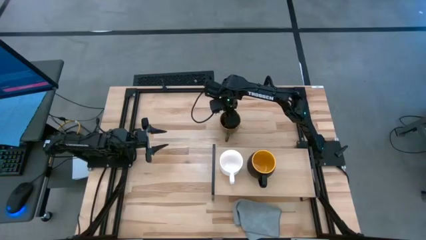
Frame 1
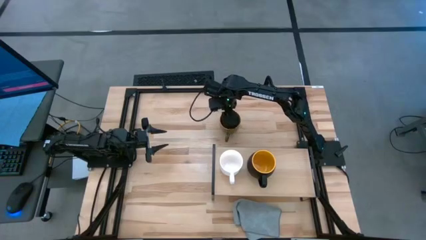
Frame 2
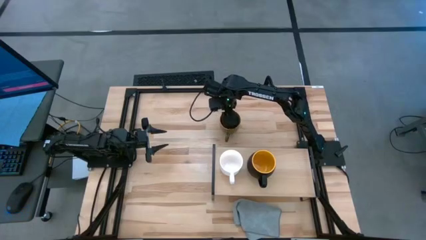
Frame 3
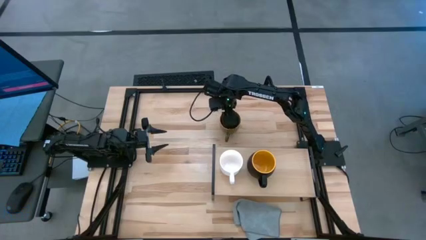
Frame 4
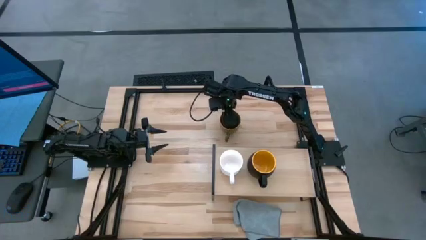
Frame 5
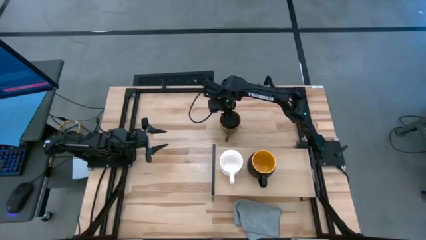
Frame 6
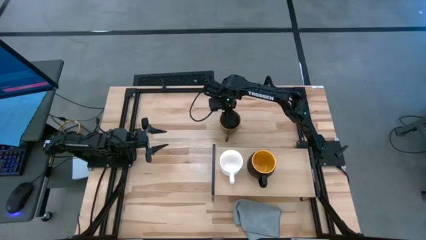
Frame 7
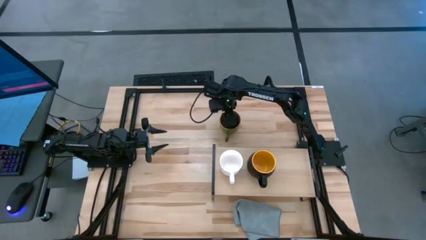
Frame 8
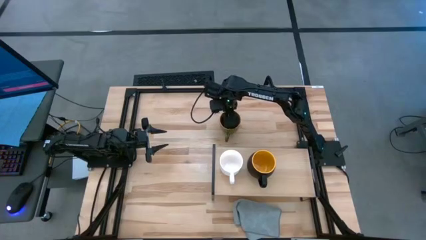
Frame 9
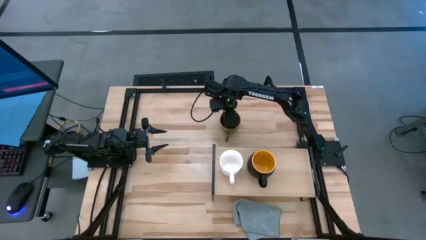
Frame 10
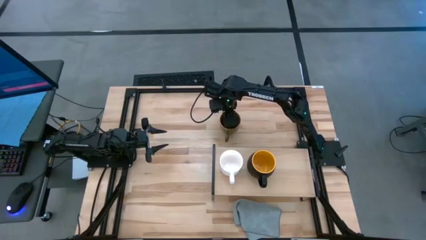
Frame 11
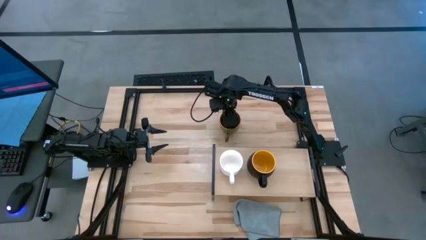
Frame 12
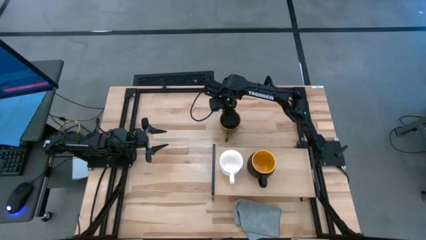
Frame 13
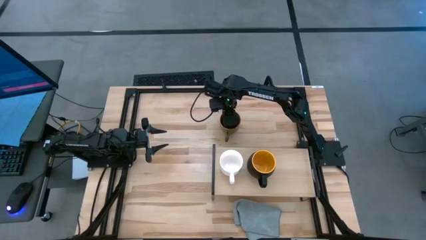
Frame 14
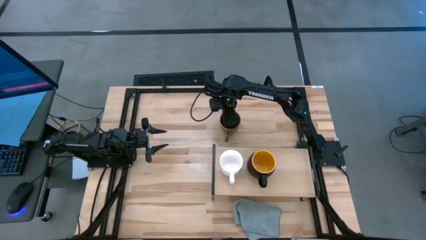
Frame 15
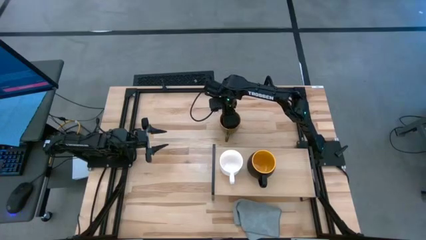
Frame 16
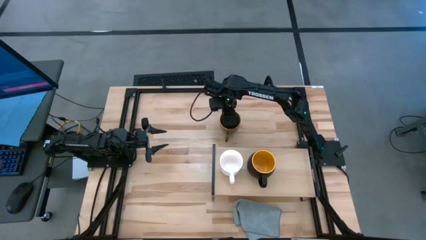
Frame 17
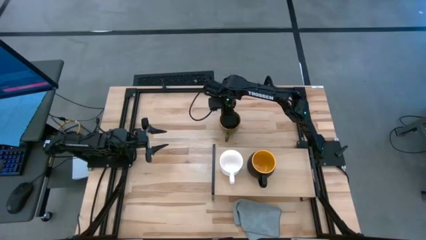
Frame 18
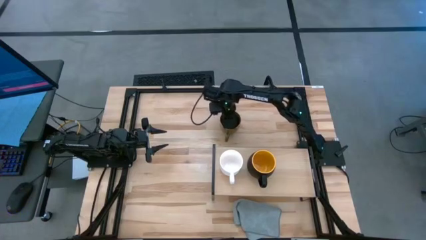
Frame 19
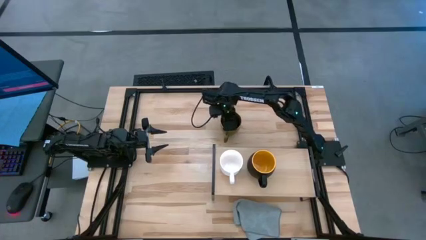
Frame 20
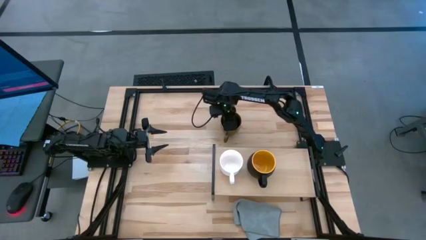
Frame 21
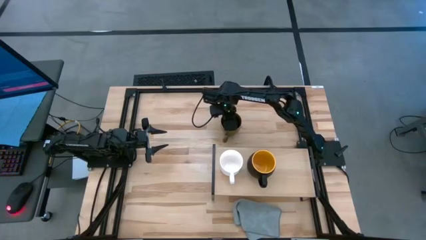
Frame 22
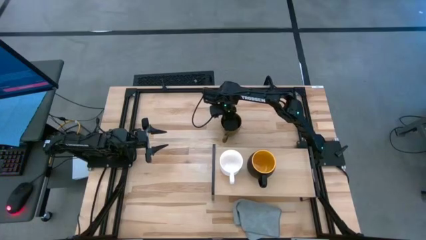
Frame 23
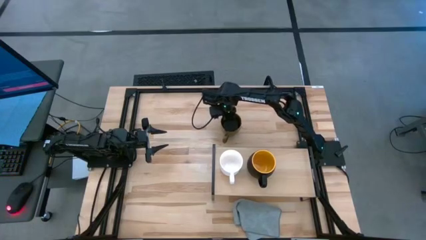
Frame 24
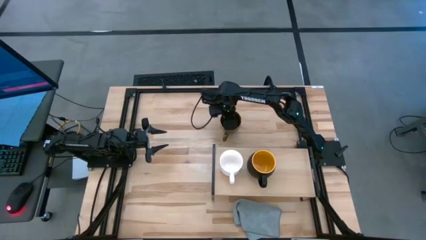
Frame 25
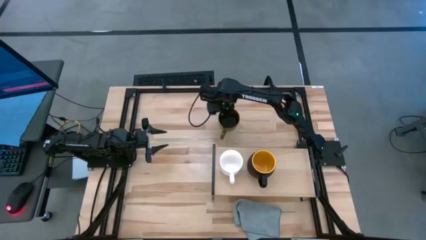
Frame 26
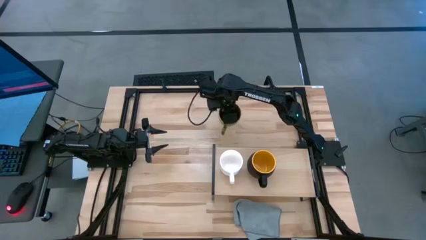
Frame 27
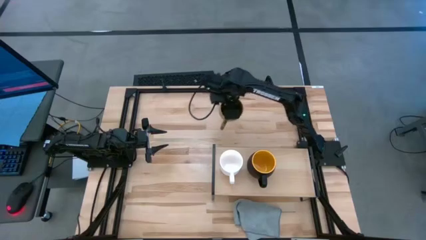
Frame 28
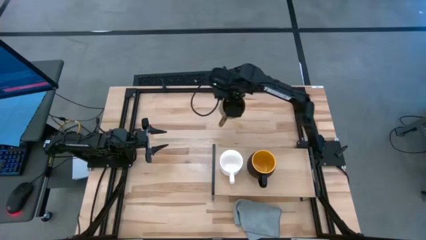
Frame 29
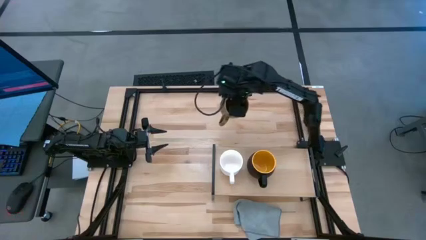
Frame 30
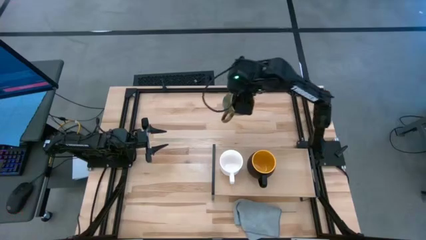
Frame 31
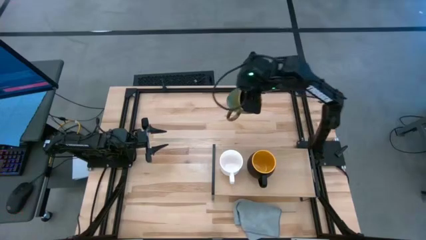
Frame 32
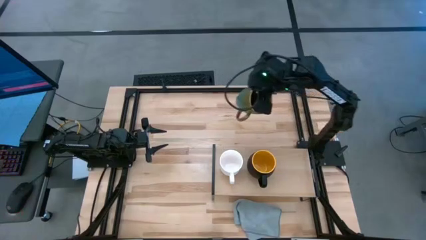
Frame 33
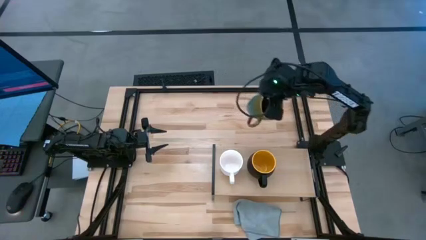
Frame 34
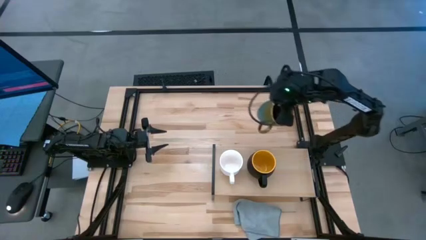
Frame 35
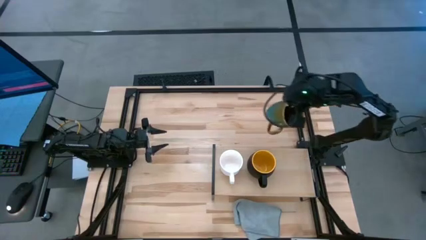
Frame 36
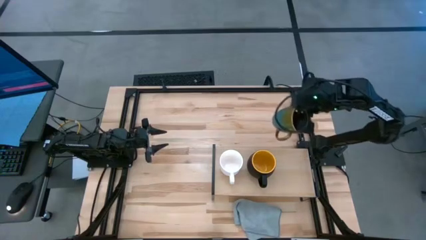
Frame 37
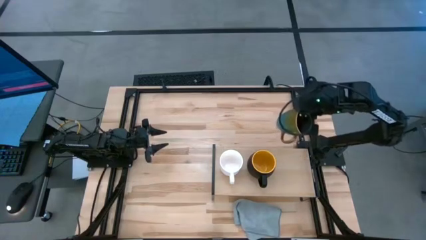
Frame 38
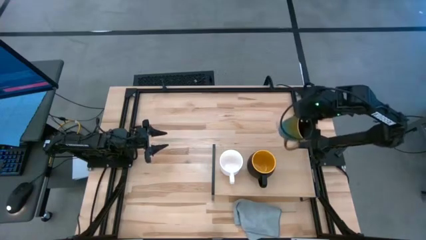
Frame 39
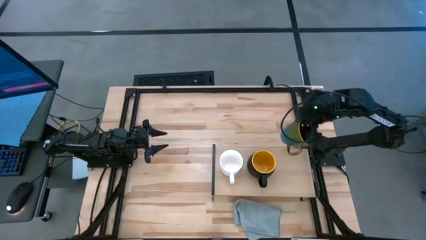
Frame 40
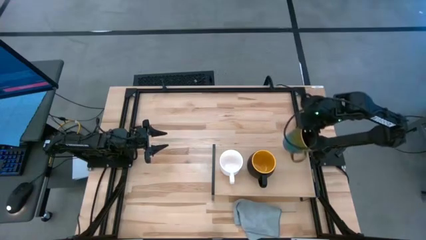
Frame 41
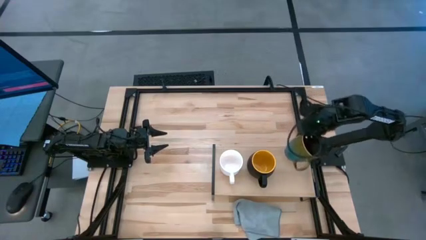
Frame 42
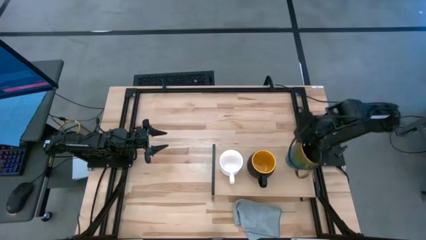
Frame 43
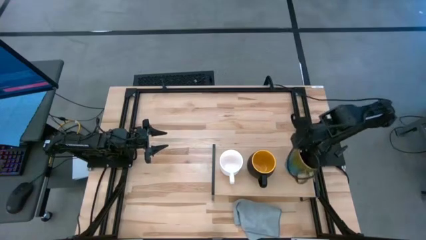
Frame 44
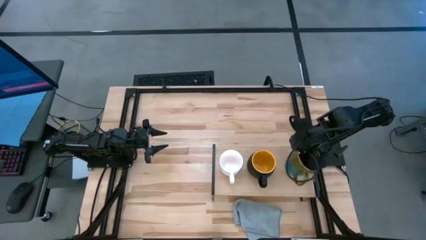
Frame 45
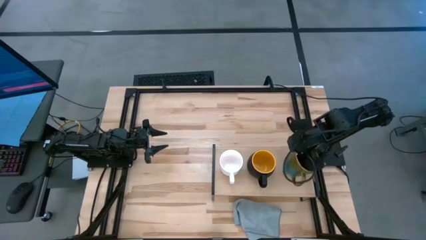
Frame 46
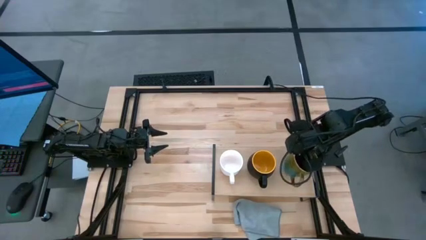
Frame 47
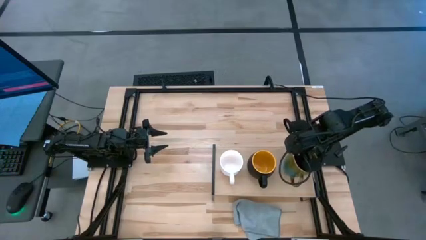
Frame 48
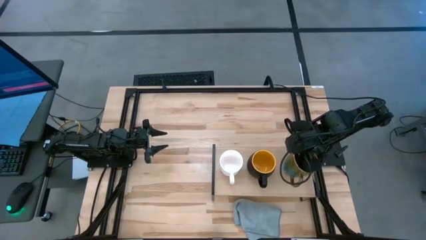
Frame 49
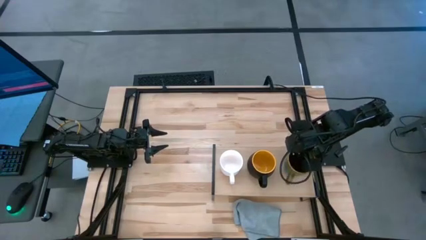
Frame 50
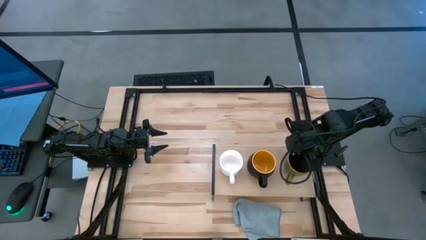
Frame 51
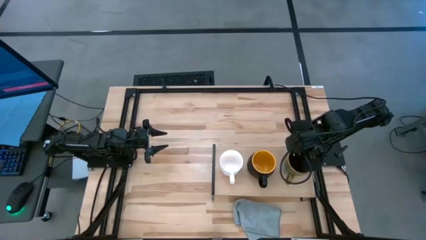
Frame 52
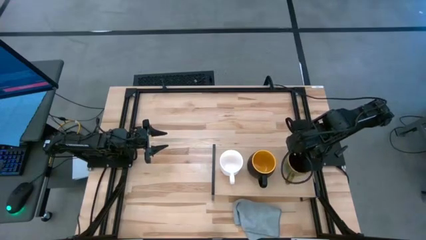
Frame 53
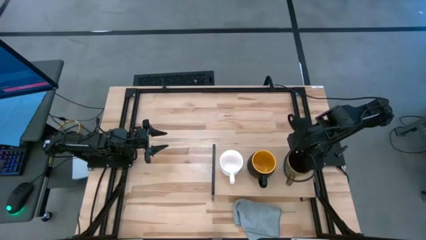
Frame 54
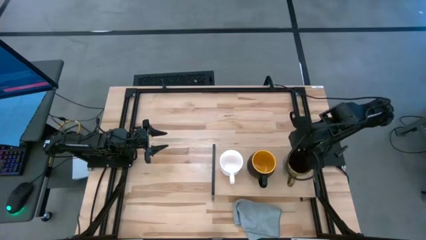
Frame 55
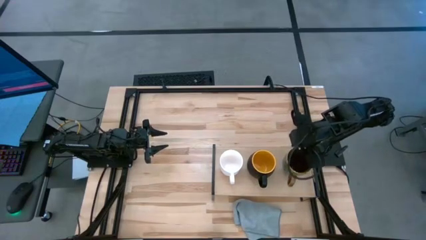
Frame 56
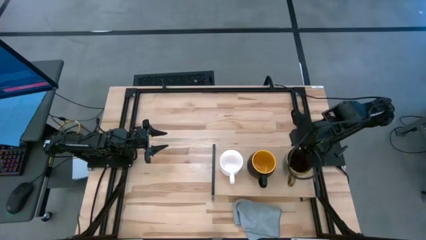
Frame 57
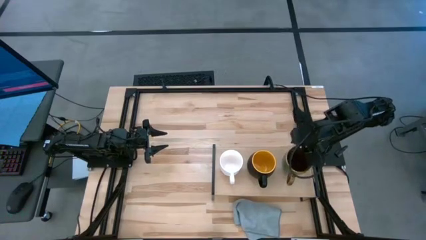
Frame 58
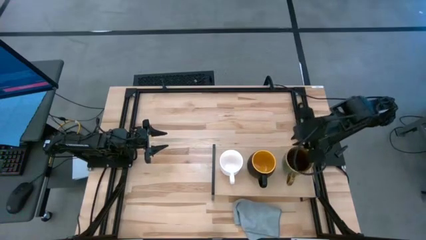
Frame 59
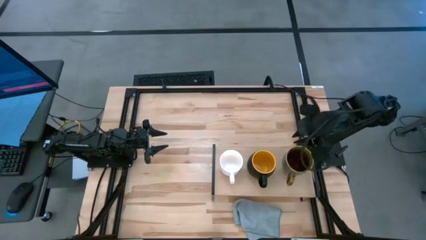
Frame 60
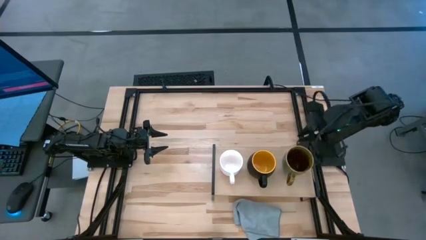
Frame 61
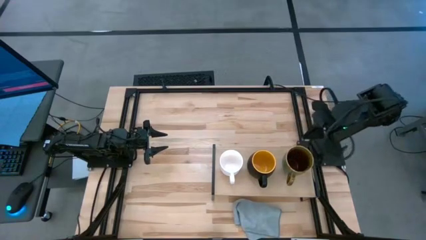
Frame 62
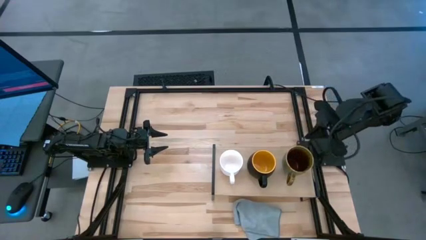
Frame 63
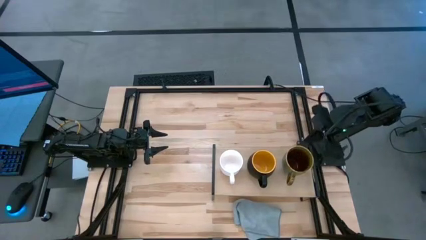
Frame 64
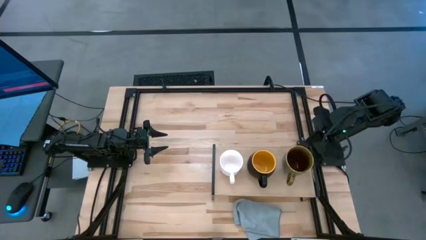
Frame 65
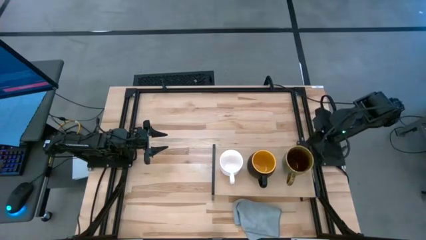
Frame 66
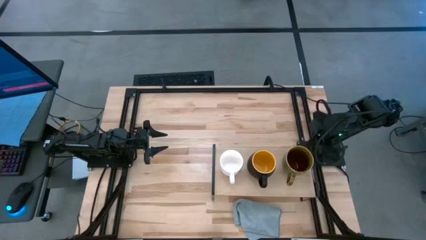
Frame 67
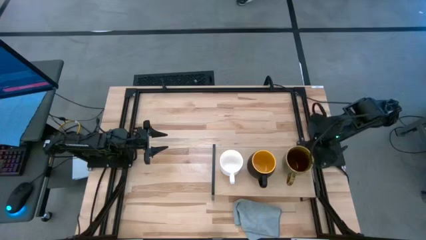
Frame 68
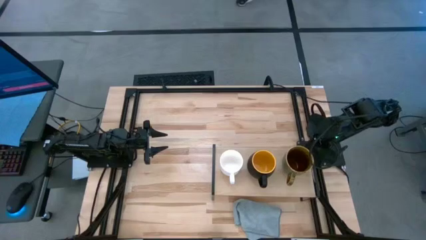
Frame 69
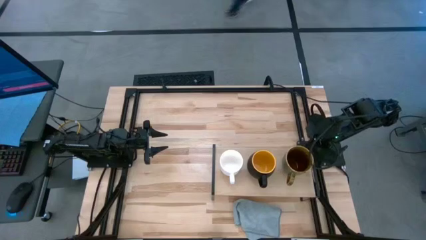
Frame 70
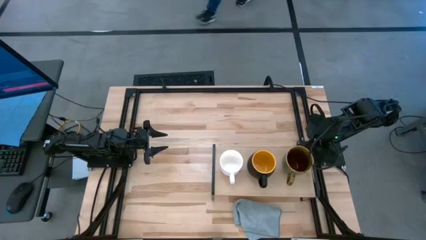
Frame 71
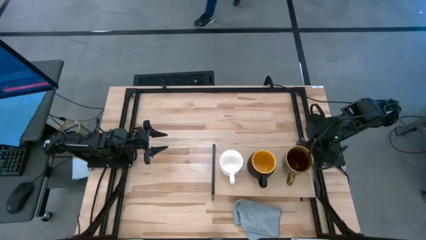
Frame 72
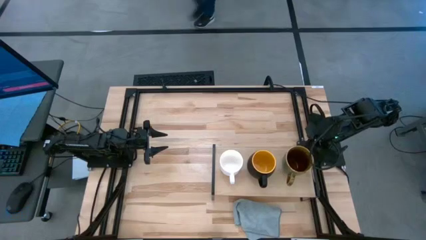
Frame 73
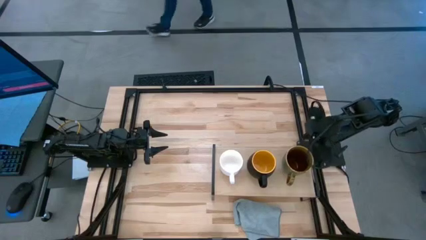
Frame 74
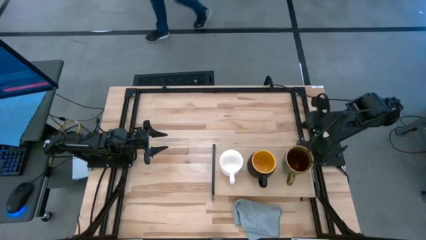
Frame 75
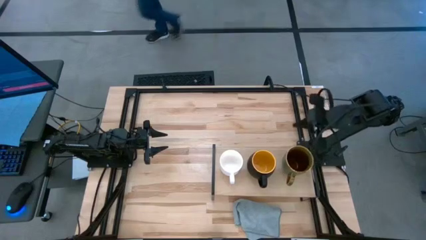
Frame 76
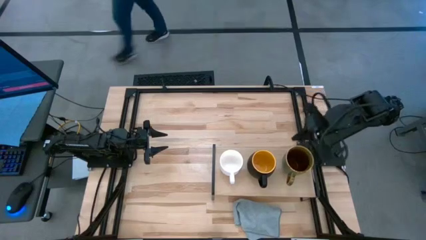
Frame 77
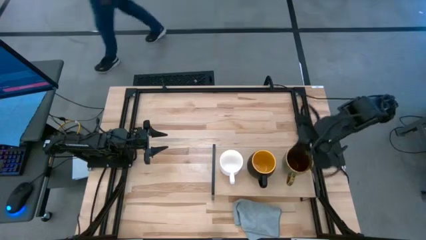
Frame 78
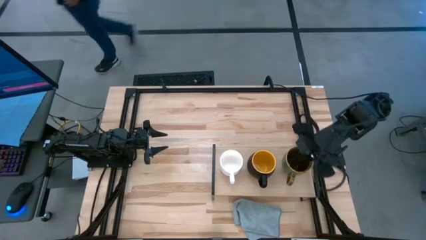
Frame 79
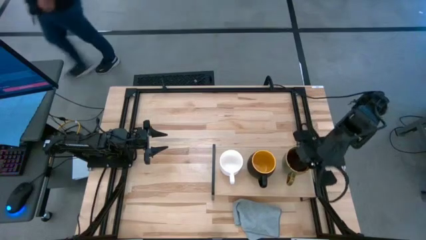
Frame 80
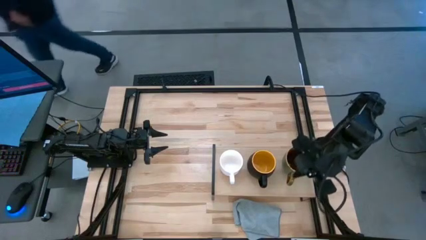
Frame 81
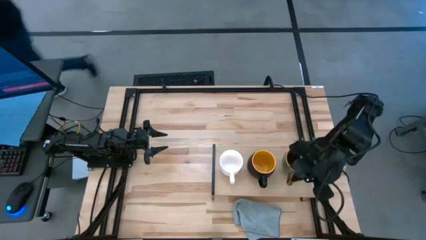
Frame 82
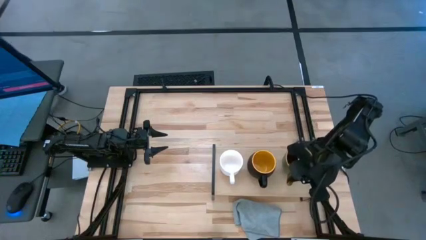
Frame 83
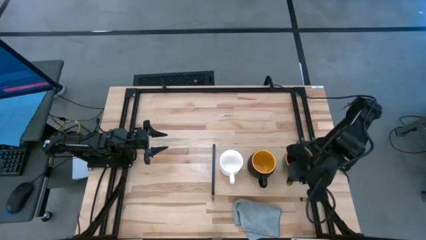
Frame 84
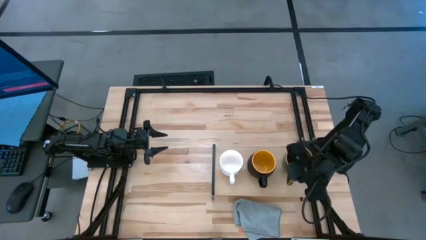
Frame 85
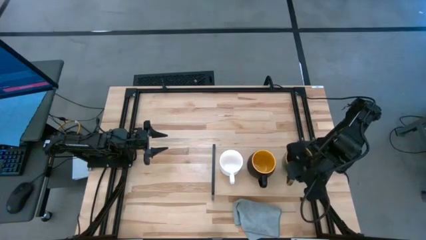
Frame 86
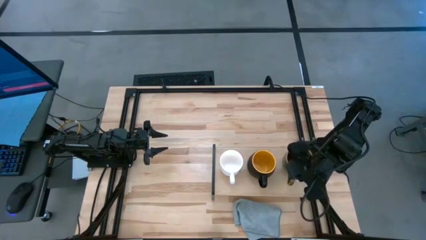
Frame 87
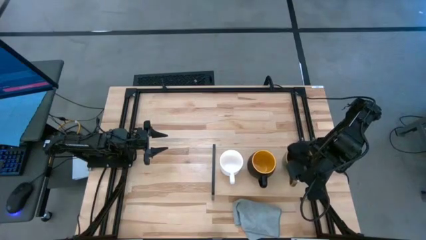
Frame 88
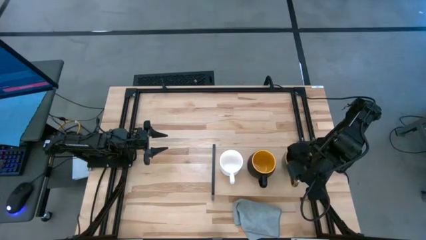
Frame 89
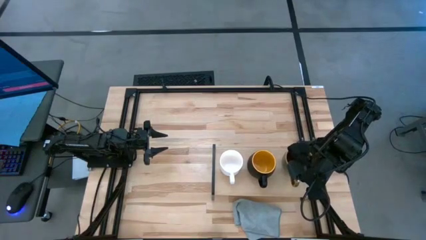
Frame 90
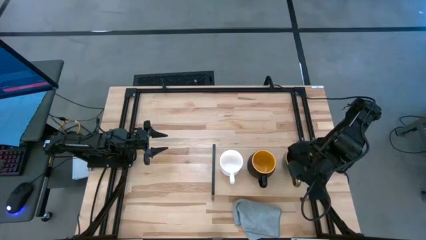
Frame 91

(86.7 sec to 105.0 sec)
Task: Stack small to large cups/mugs on shelf
Put the blue mug on the shelf
